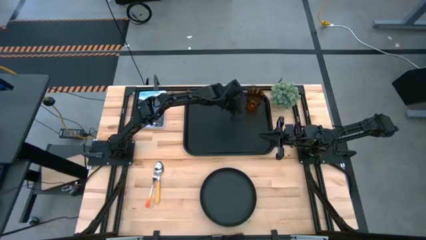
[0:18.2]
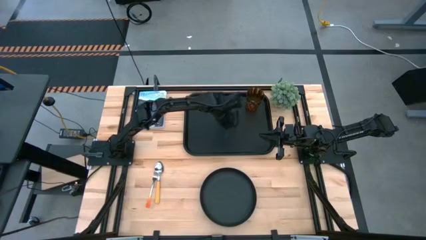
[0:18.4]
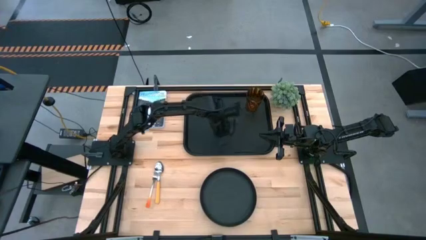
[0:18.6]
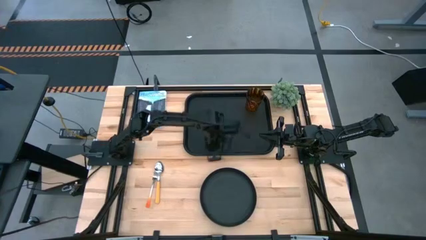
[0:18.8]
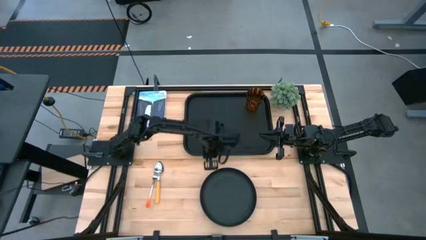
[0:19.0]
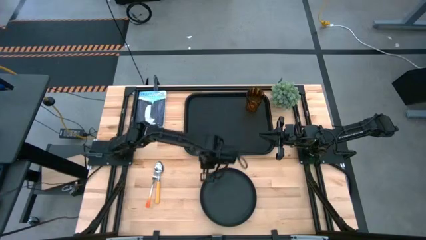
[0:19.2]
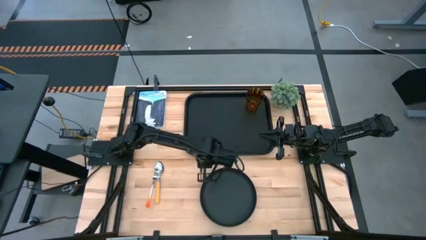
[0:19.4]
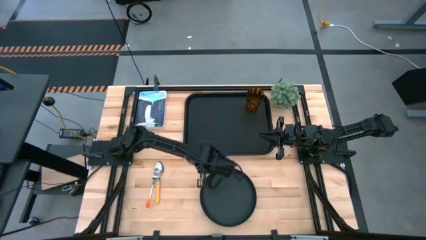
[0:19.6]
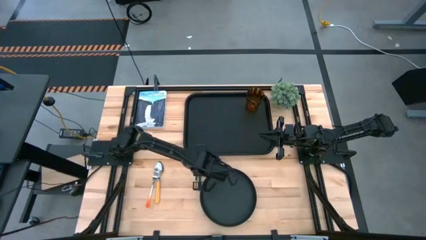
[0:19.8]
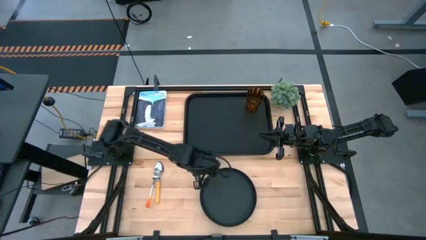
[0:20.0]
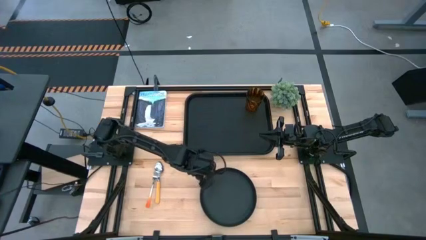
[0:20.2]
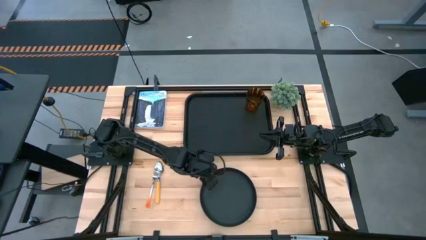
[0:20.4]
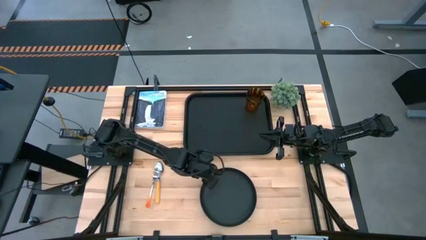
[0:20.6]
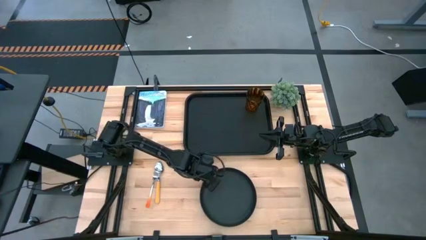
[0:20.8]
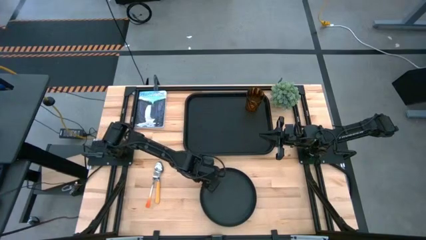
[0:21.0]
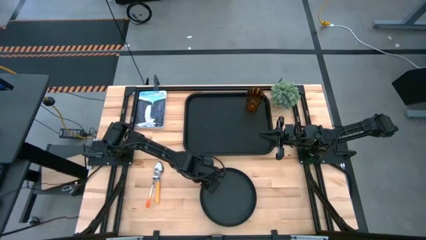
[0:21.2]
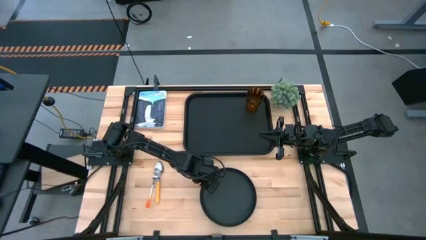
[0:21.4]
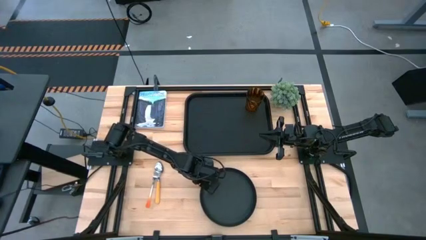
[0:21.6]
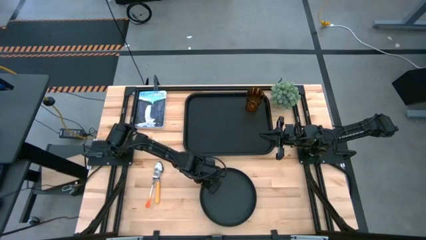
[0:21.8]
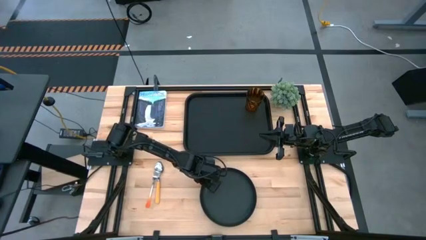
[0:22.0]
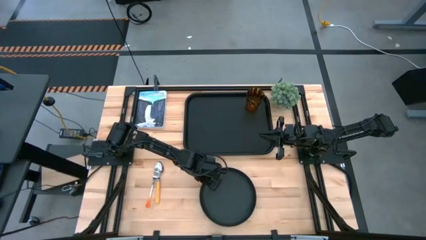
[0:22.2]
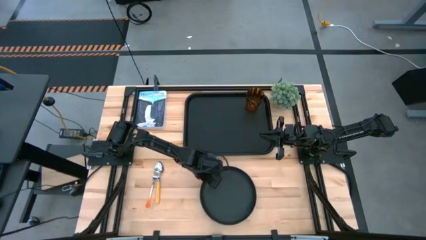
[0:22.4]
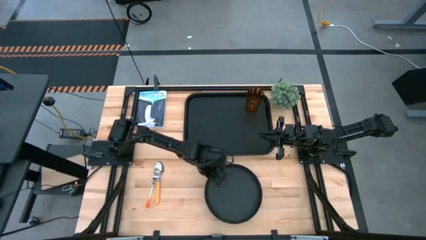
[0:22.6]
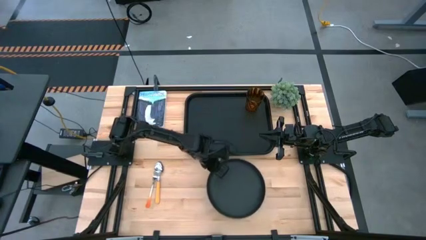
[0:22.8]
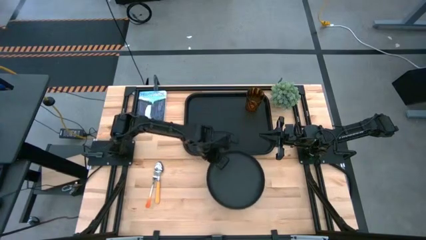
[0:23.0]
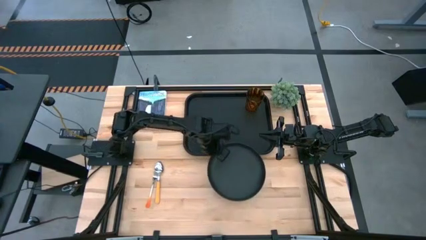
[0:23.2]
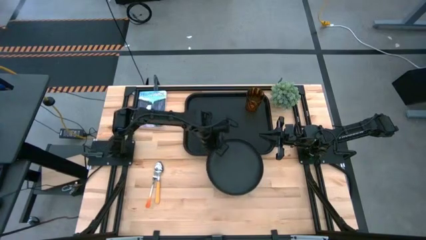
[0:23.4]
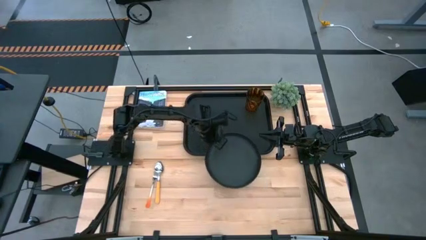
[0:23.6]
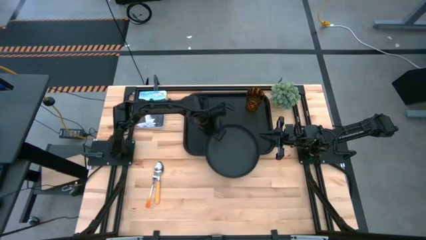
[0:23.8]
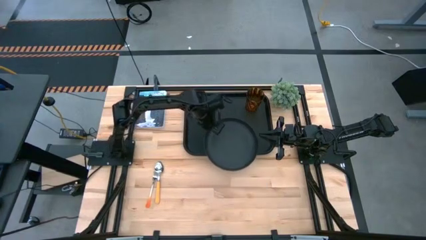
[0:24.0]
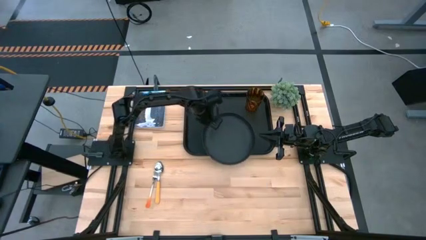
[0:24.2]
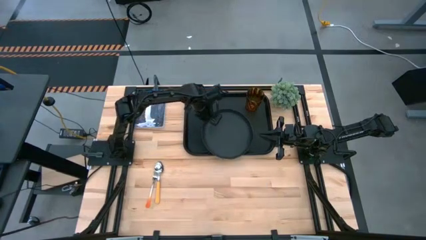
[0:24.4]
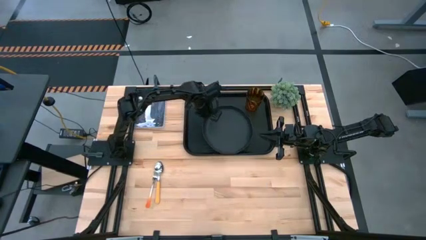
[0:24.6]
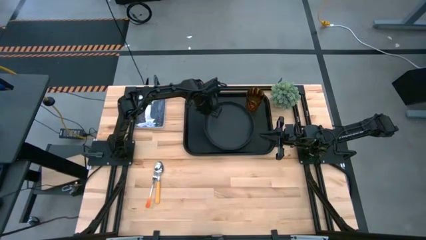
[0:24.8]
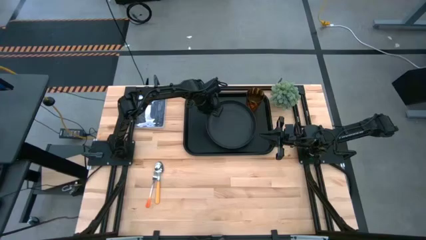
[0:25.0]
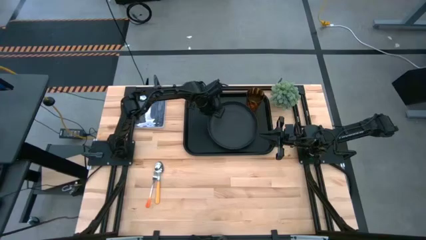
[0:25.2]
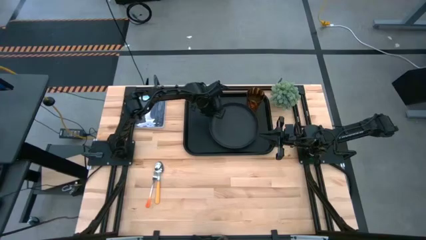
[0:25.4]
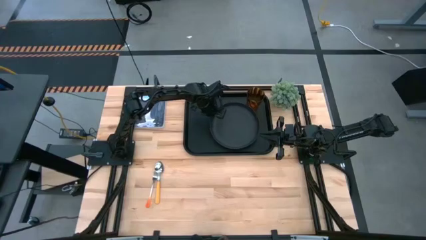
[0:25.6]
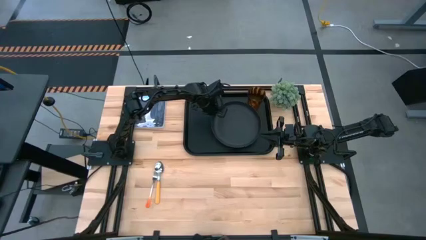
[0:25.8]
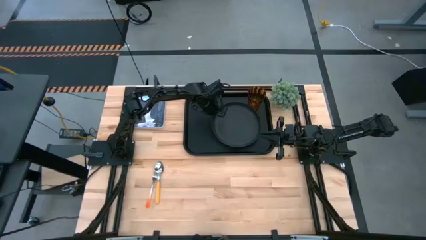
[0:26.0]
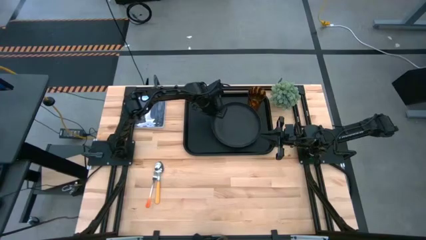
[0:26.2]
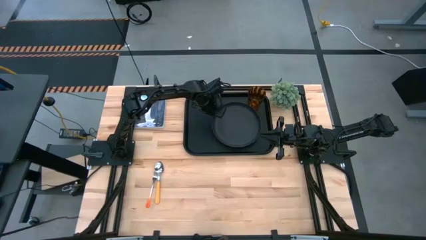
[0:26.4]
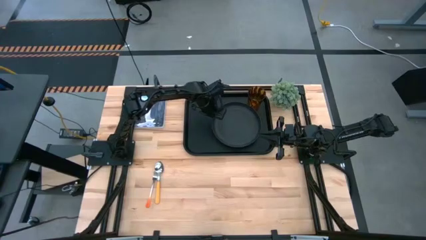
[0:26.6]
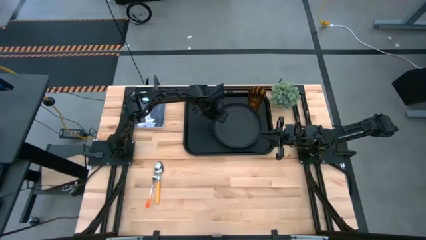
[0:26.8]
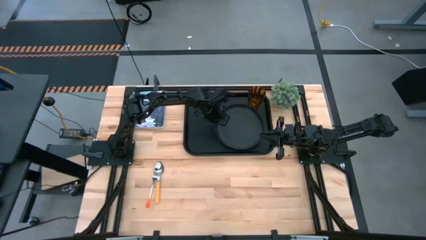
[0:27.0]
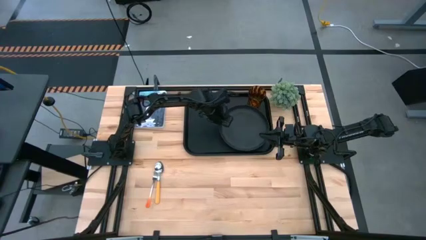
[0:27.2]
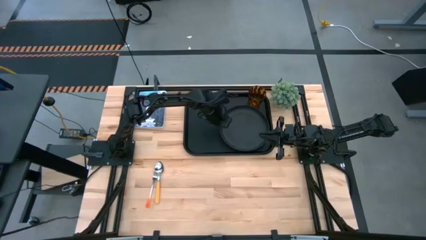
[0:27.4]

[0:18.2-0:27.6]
Task: Pick and place plate/cup/fork/spoon on tray
Put the black plate on the black tray

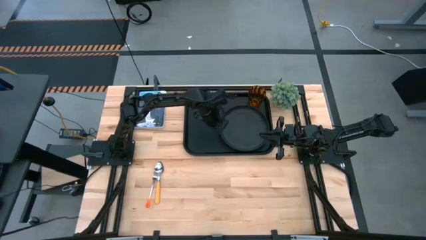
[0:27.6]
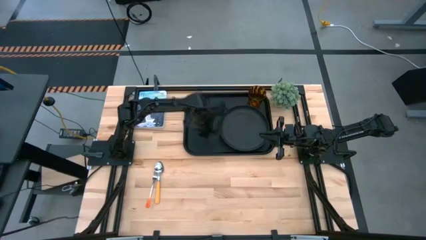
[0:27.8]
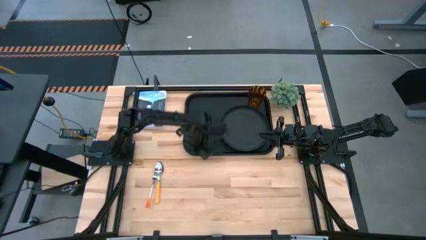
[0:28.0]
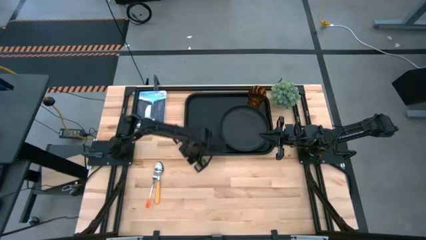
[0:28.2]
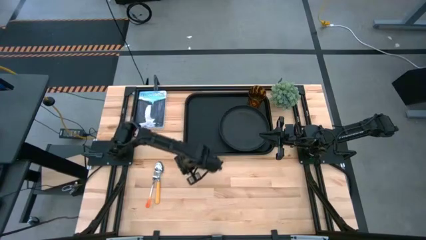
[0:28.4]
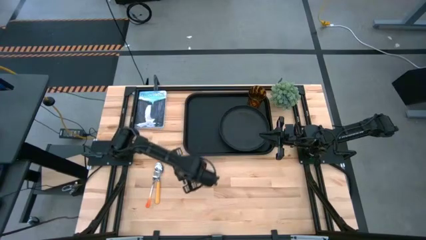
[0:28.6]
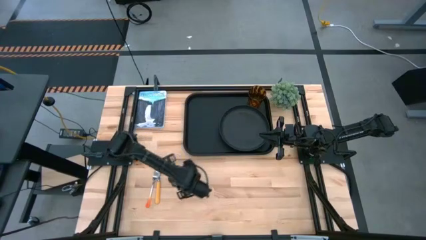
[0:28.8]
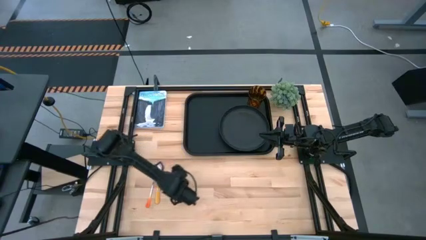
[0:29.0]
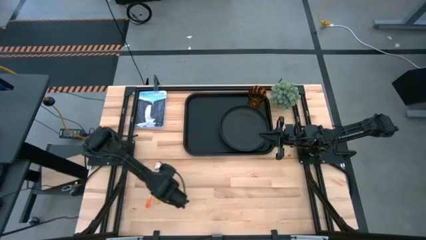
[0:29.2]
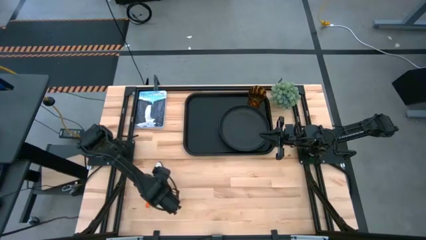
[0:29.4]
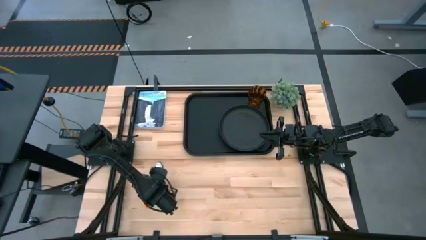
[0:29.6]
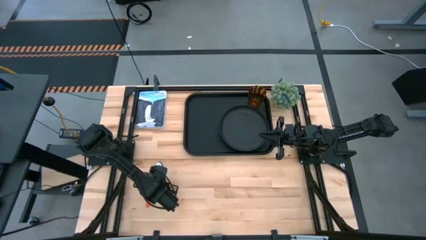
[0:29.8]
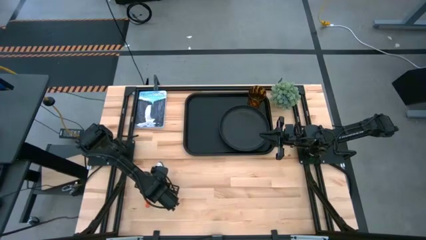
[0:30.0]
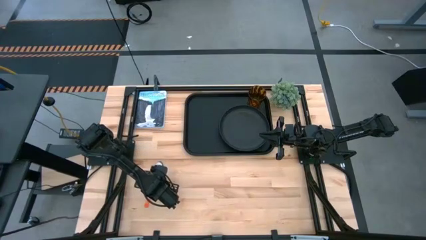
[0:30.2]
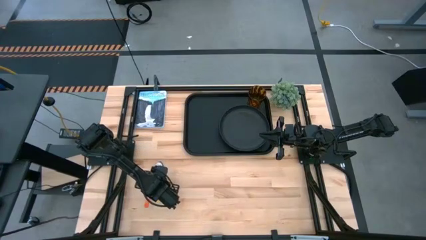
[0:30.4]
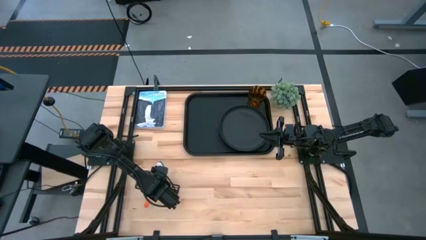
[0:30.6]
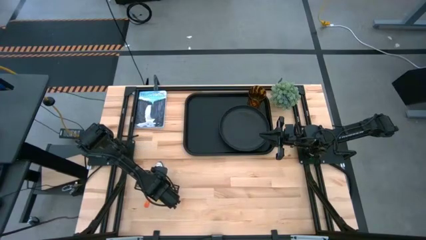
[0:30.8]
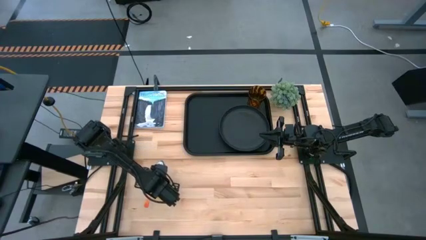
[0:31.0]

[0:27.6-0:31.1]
Put the orange fork on the black tray on the left side of the black plate

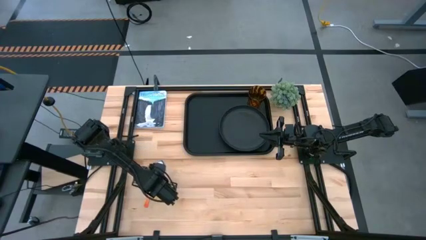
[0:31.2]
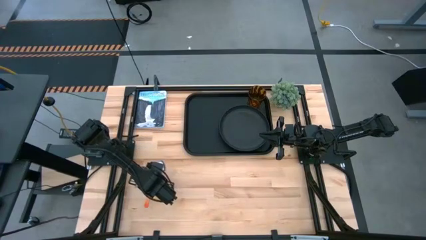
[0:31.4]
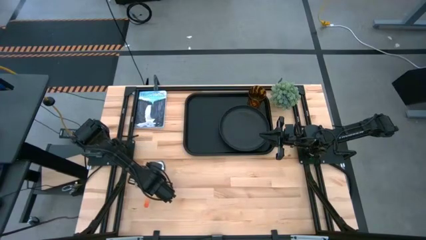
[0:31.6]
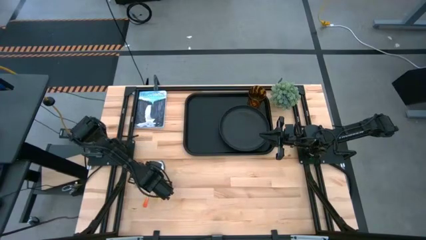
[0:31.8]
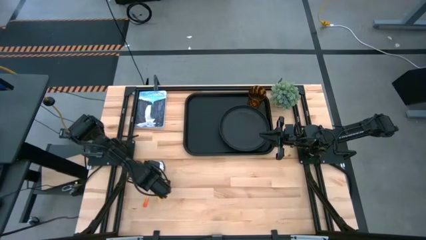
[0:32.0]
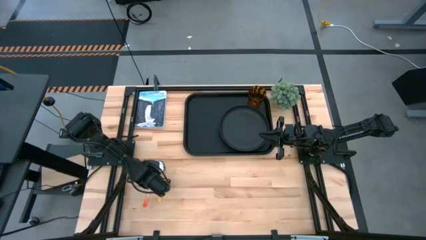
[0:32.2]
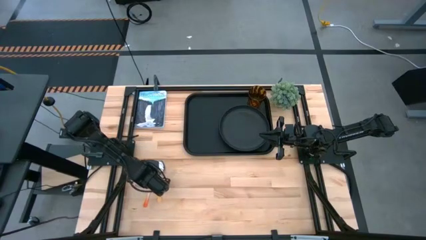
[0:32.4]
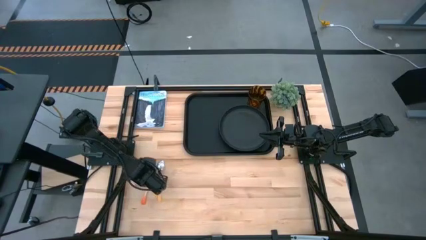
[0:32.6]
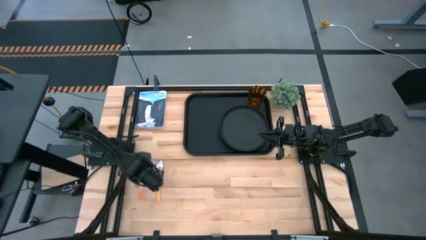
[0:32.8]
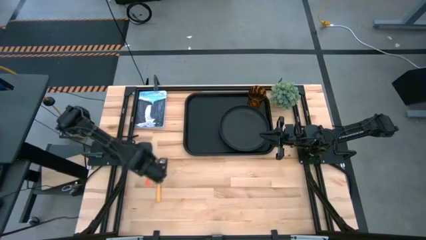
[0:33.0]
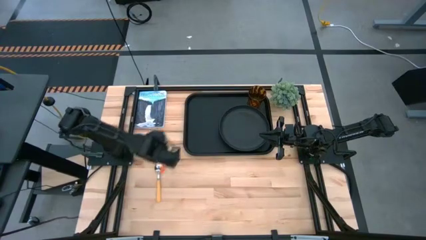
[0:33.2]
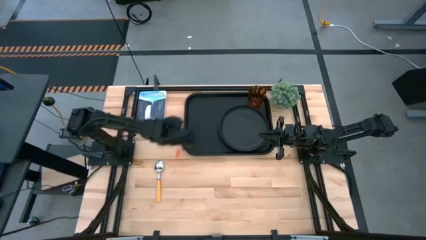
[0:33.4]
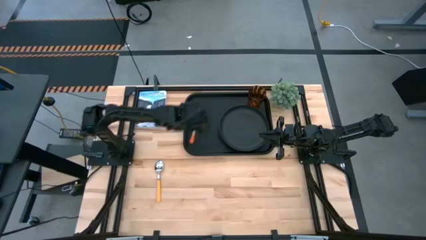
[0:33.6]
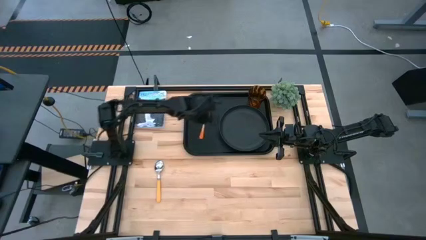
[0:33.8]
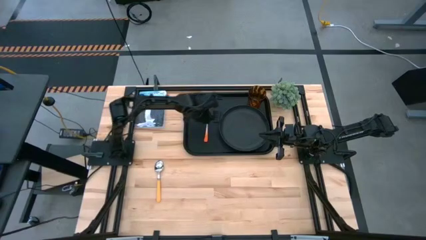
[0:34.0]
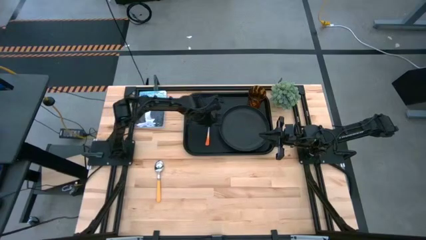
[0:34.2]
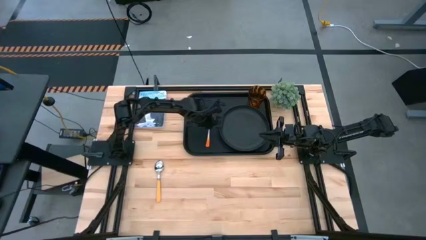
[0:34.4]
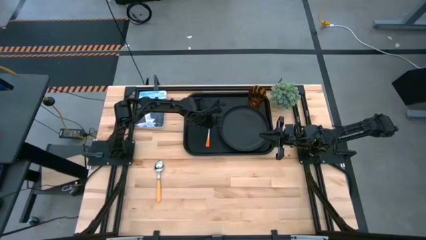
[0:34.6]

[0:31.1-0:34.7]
Put the orange fork on the black tray on the left side of the black plate
